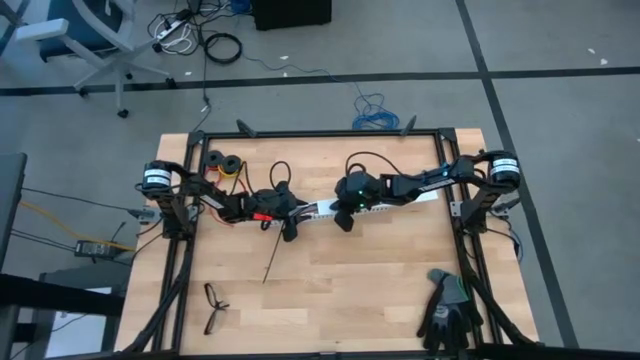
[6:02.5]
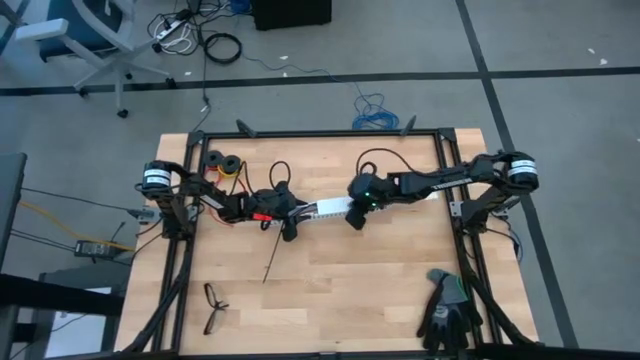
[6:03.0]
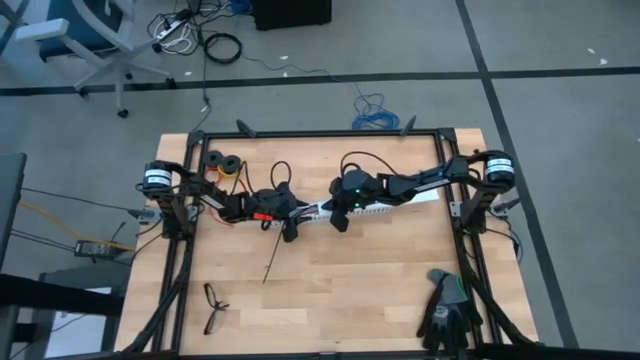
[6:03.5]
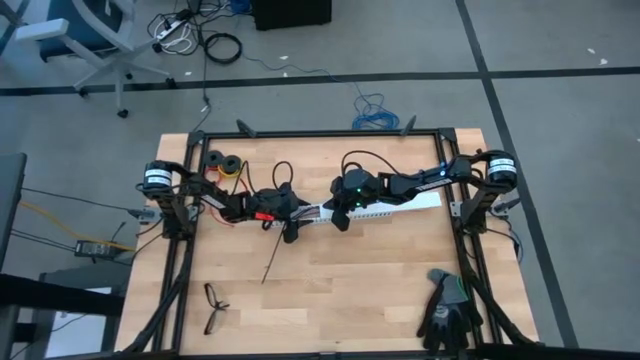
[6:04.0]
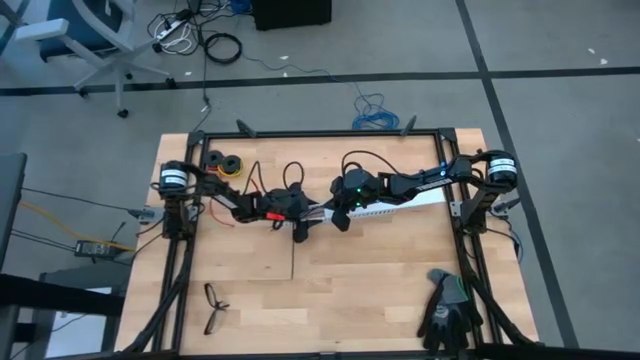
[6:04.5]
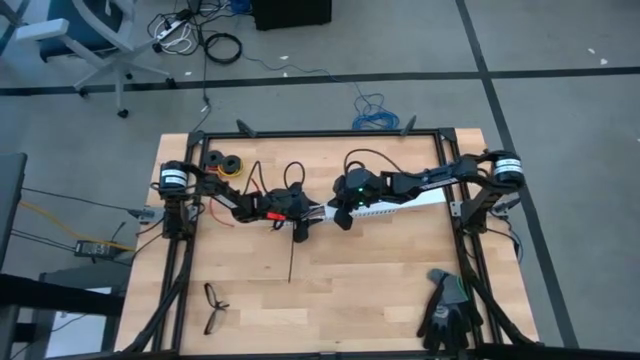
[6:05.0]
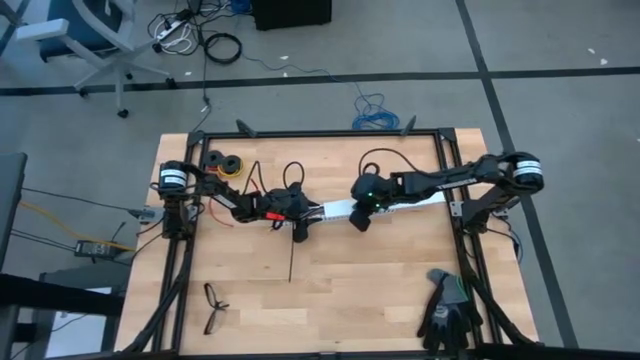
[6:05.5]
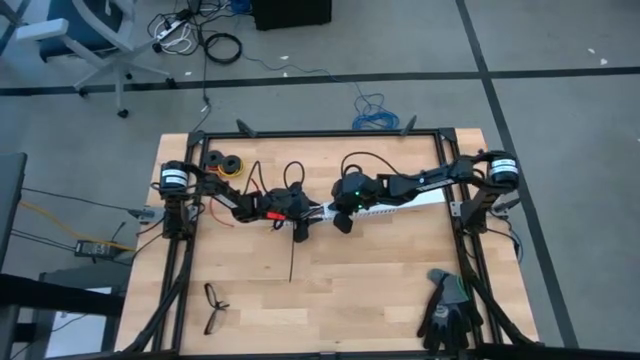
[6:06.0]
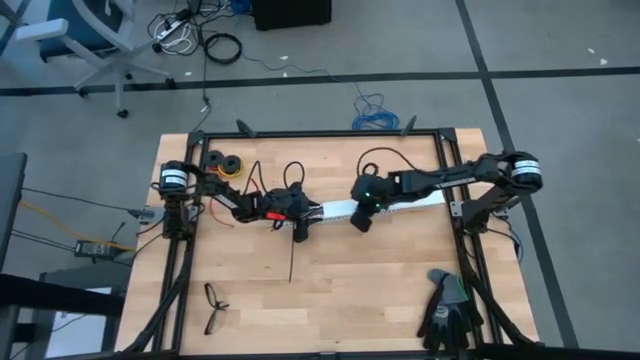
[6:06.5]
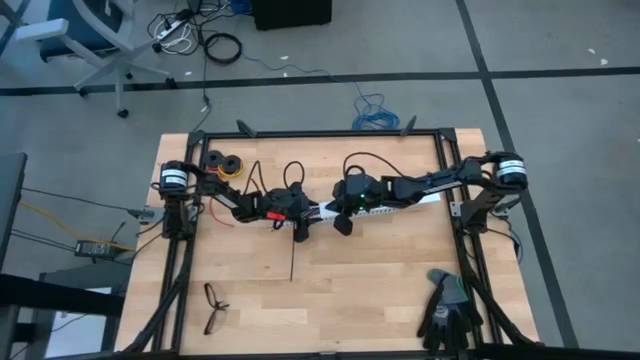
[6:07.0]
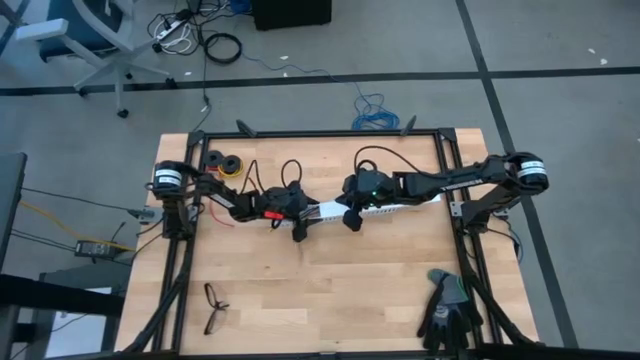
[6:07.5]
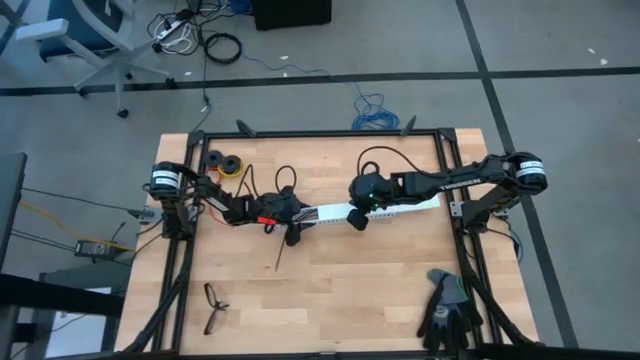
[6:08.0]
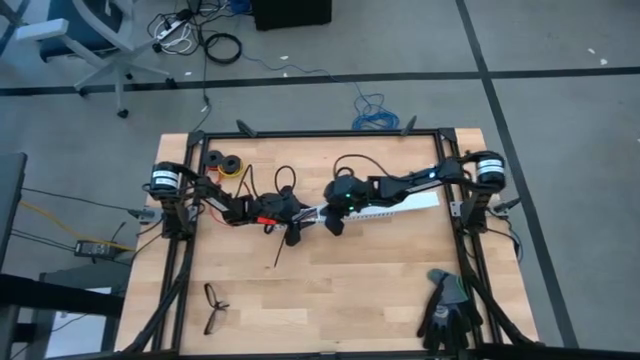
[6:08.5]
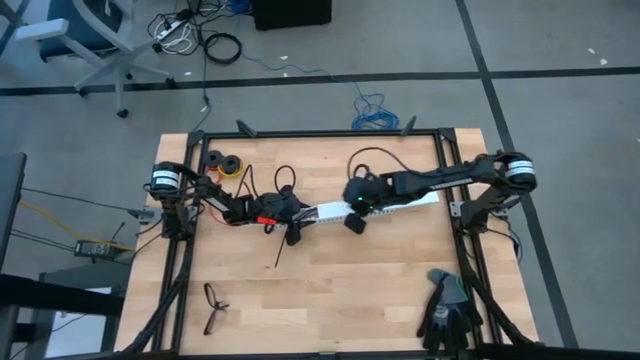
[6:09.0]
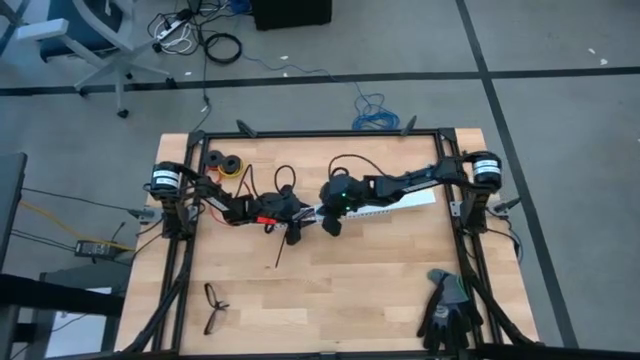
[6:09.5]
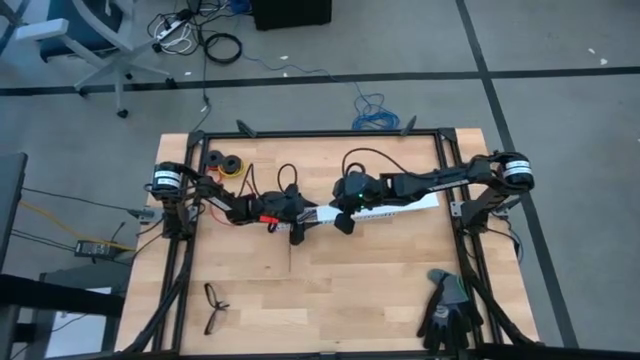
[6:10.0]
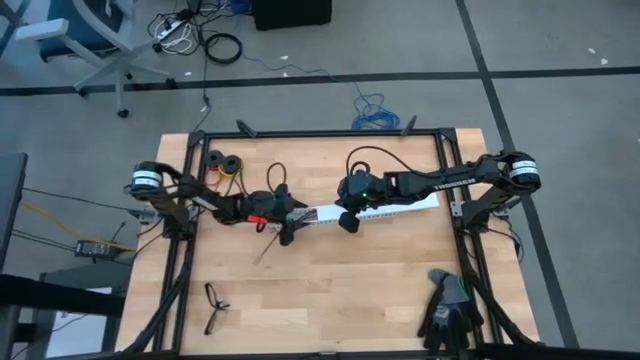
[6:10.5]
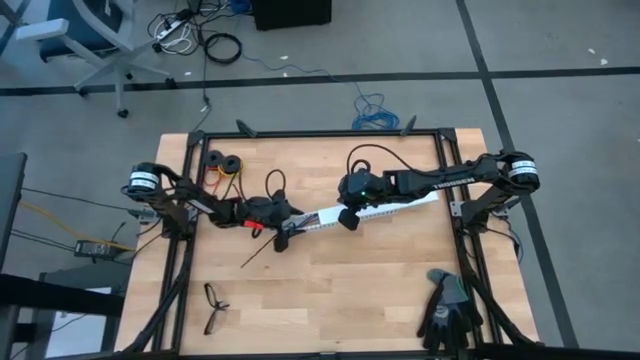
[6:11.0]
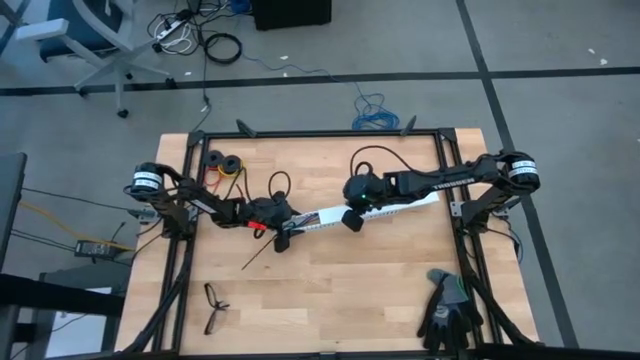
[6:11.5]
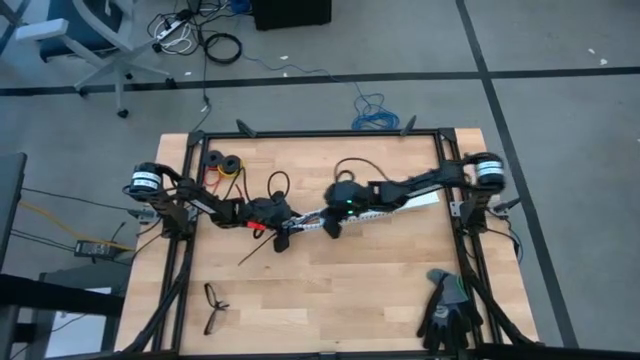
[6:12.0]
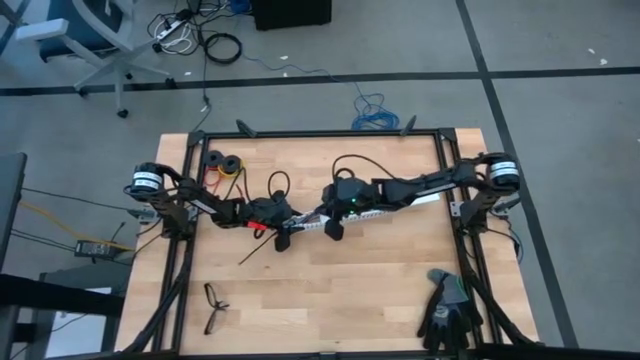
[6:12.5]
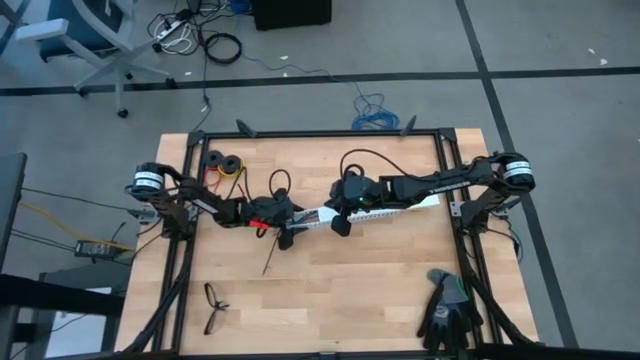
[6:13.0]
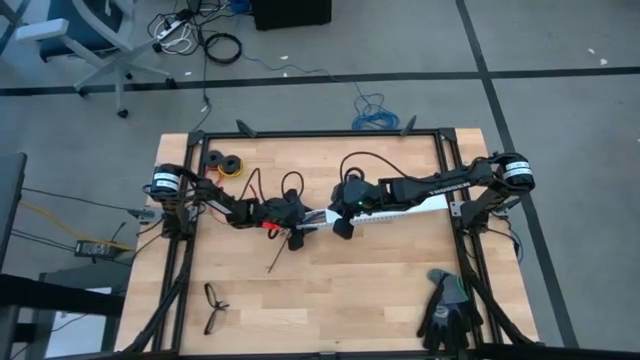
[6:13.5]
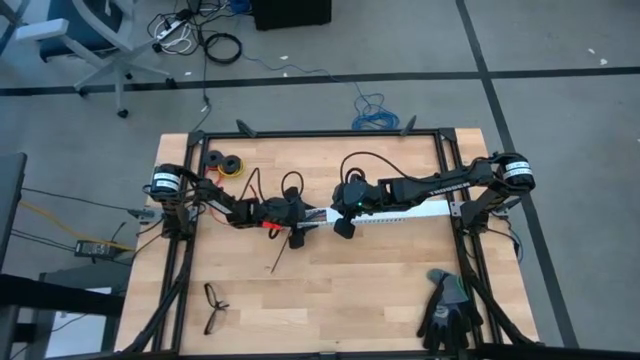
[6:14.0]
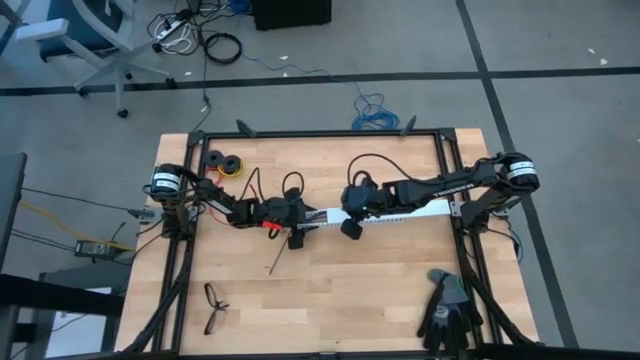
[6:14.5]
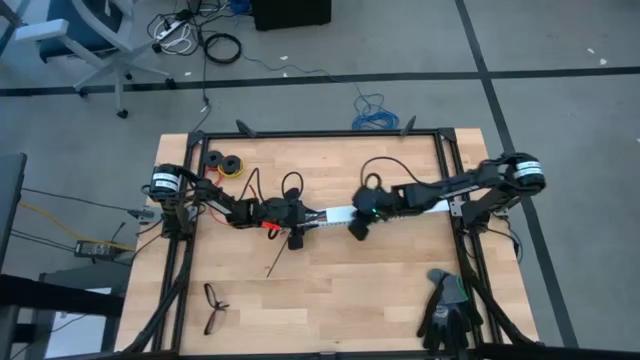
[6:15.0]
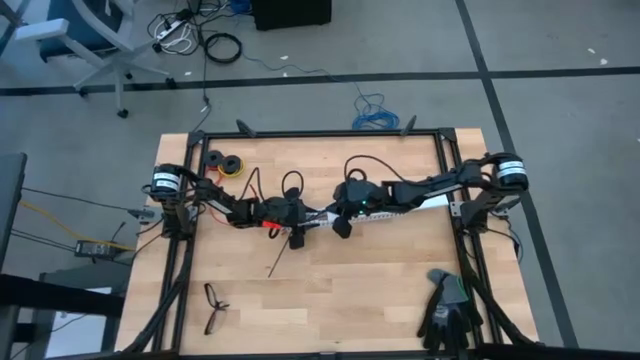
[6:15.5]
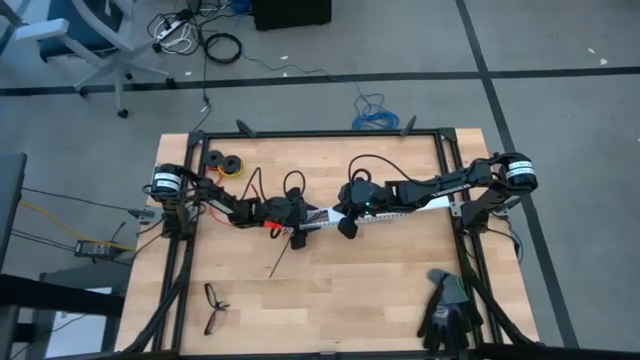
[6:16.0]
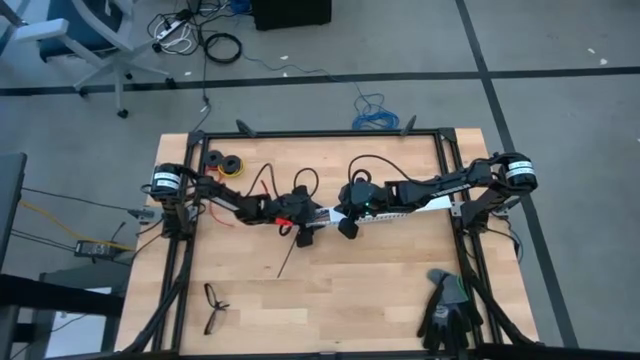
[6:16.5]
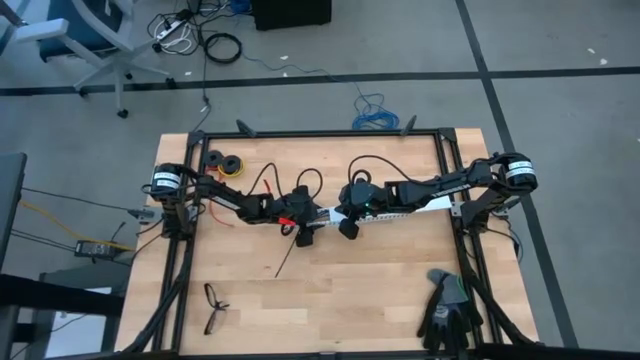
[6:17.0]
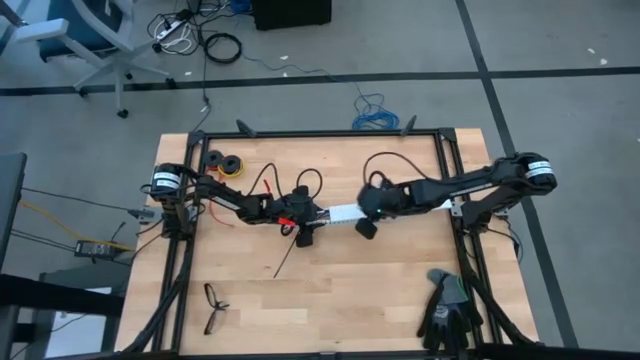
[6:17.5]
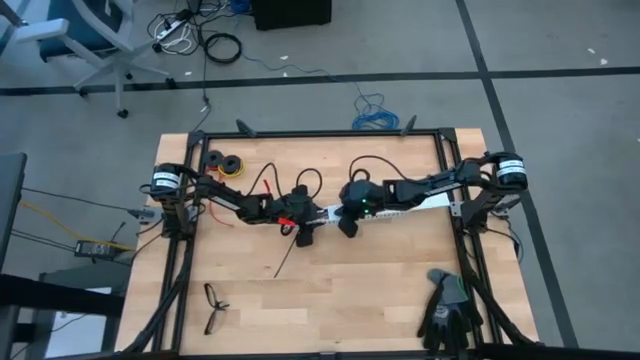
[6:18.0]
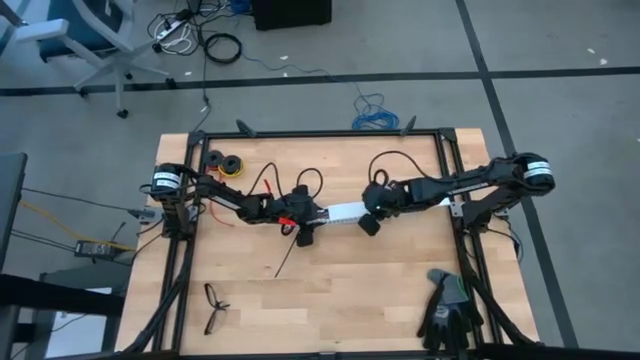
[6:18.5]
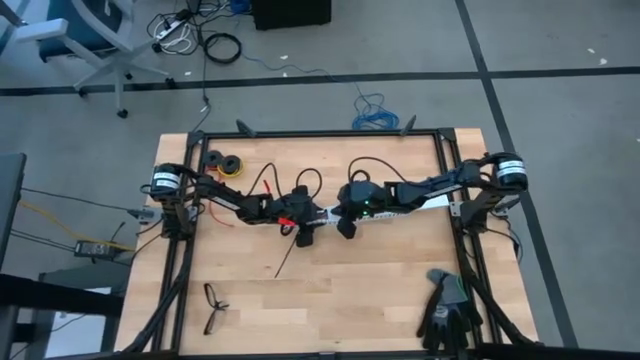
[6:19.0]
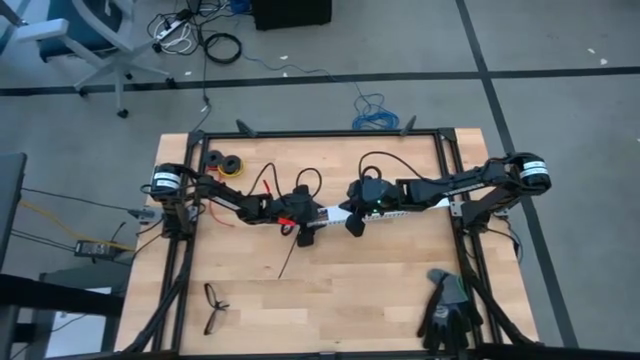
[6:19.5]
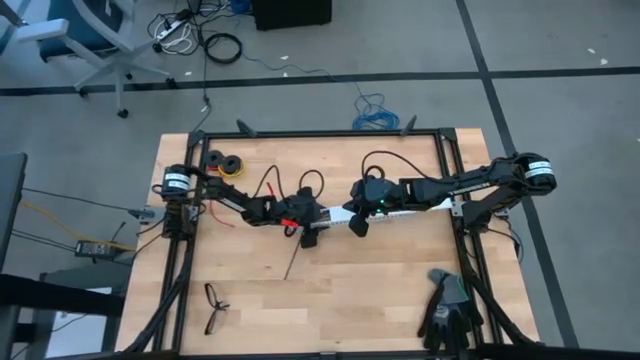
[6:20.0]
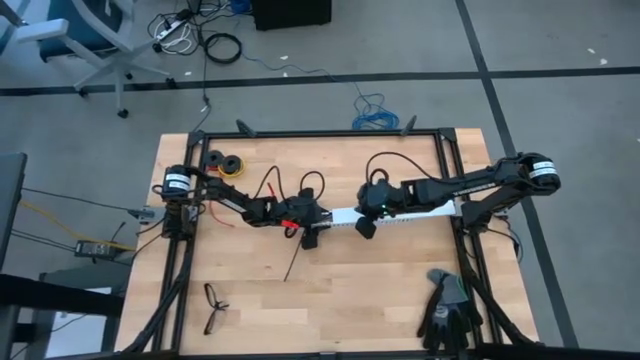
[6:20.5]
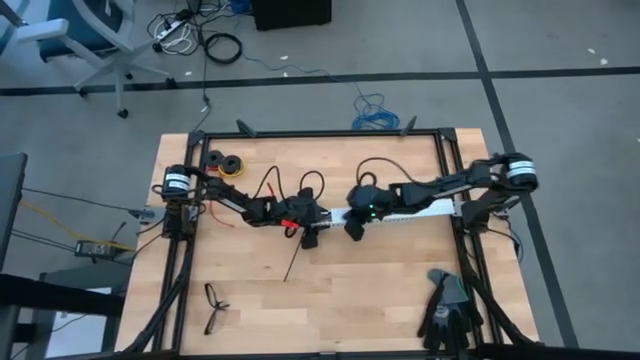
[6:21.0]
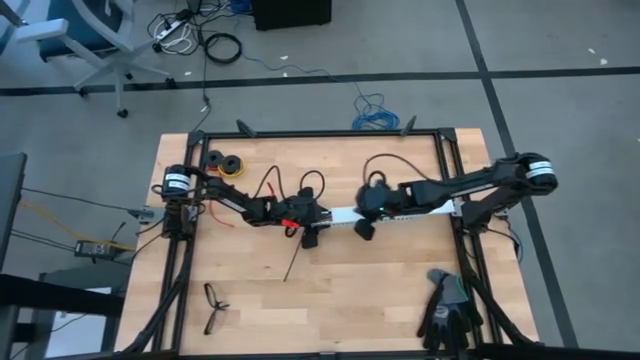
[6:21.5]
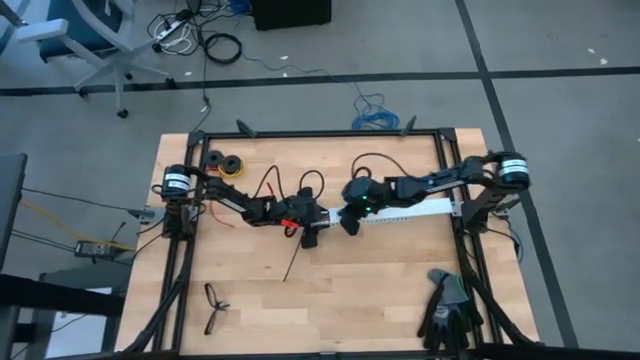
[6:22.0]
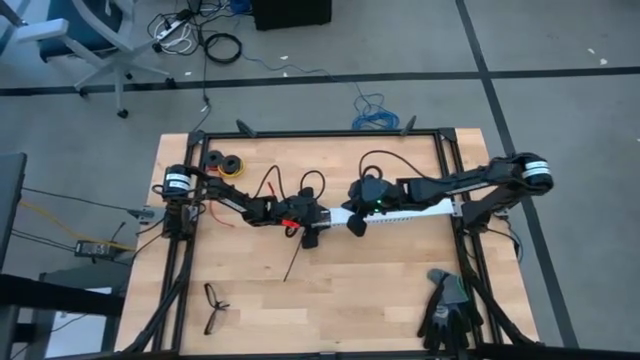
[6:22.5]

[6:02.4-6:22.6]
Task: Ziptie cables
Close the white cable duct
